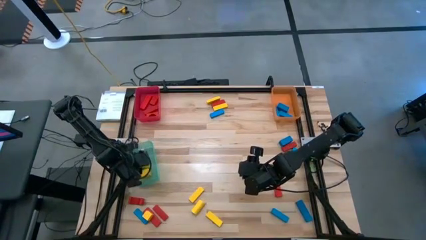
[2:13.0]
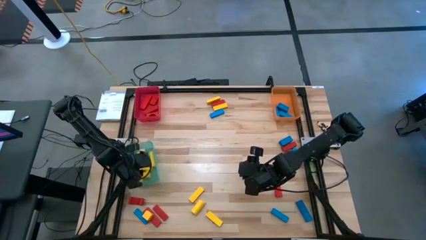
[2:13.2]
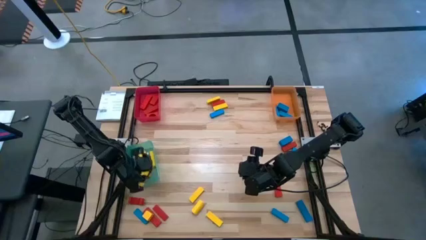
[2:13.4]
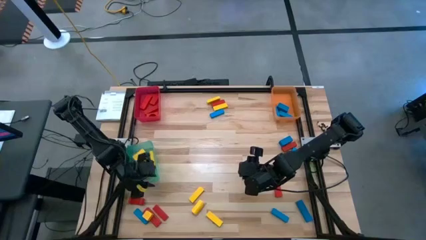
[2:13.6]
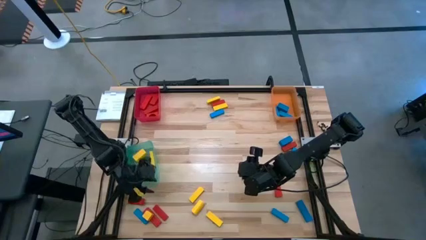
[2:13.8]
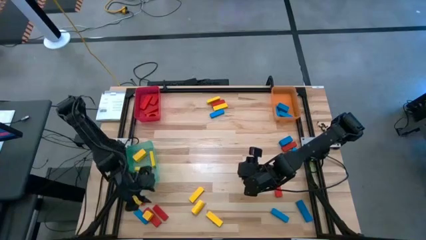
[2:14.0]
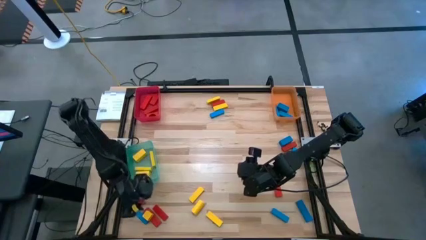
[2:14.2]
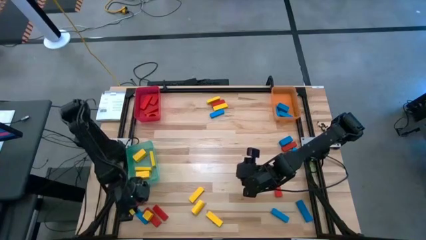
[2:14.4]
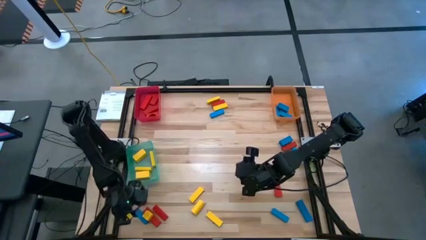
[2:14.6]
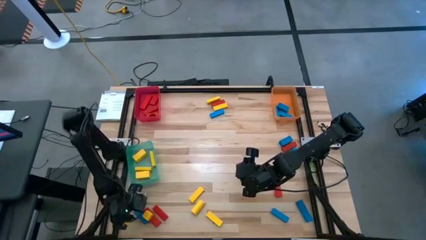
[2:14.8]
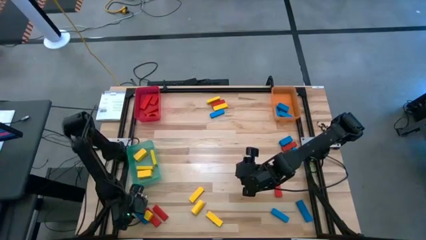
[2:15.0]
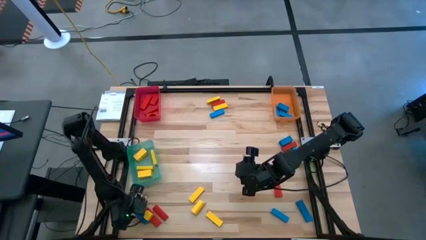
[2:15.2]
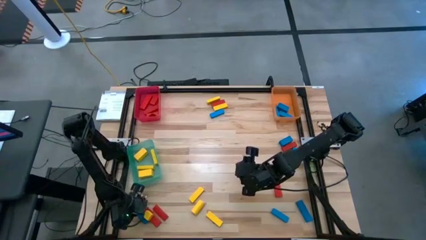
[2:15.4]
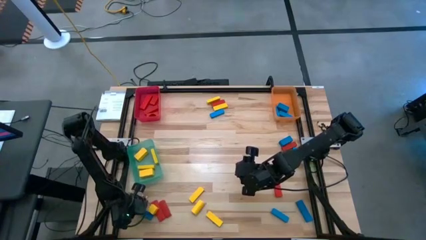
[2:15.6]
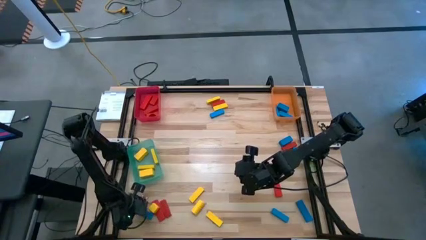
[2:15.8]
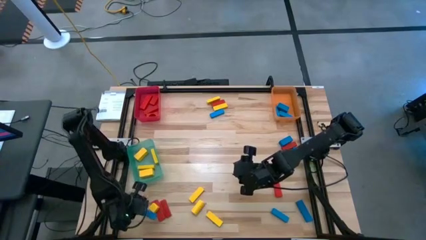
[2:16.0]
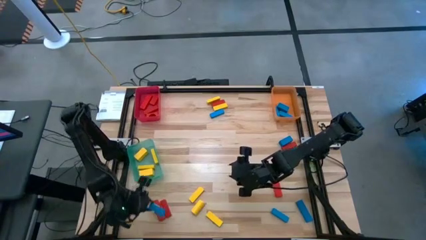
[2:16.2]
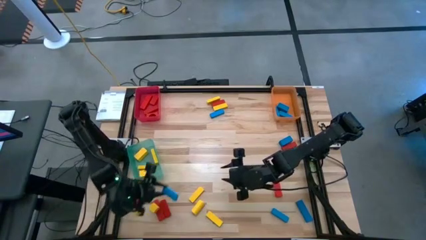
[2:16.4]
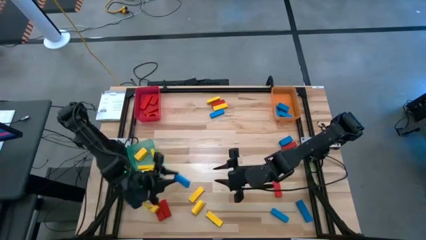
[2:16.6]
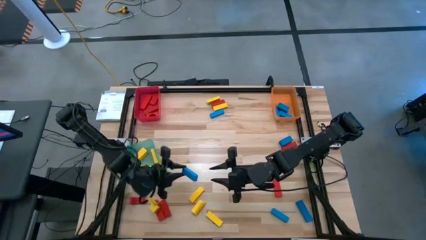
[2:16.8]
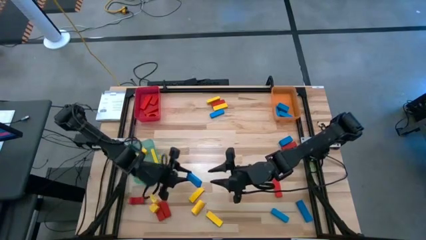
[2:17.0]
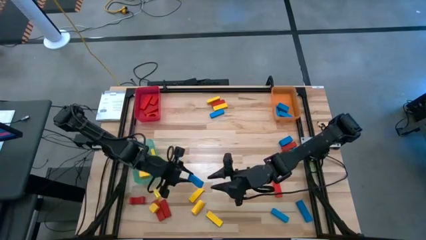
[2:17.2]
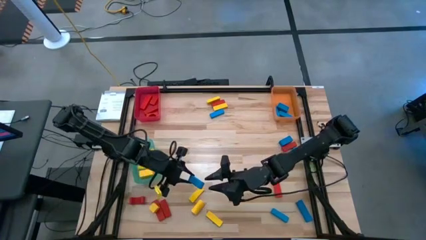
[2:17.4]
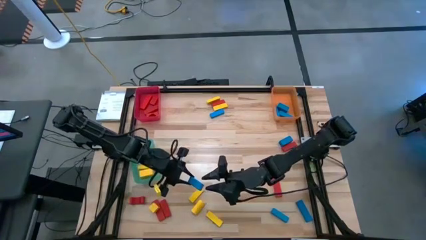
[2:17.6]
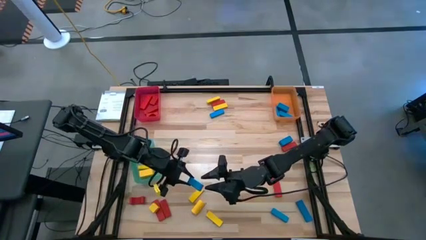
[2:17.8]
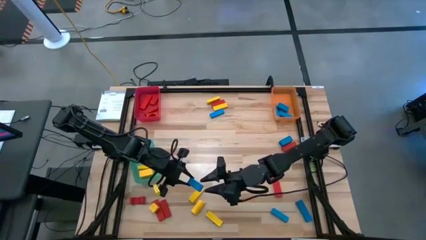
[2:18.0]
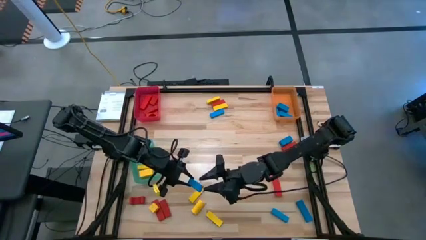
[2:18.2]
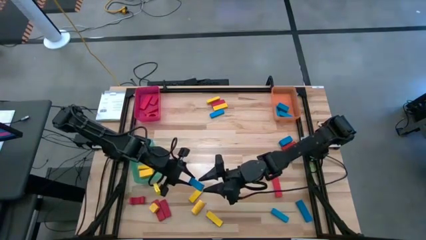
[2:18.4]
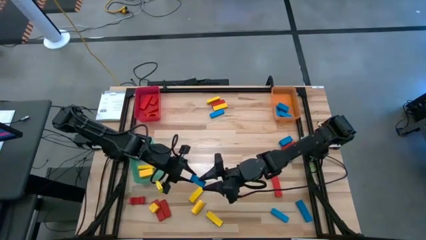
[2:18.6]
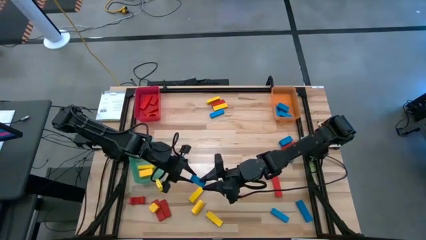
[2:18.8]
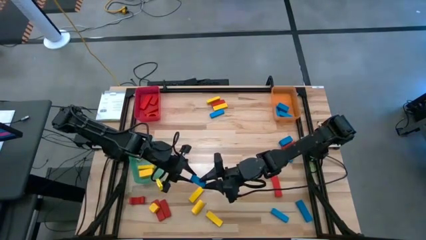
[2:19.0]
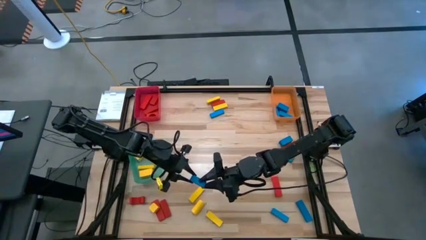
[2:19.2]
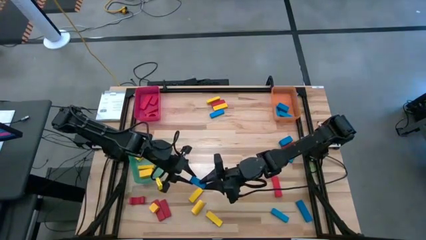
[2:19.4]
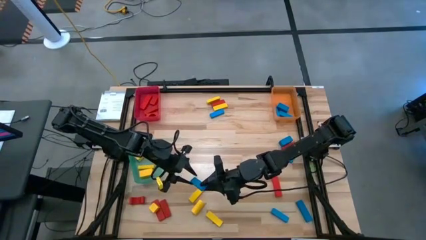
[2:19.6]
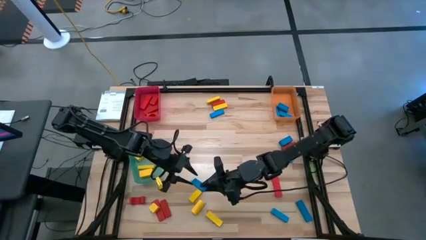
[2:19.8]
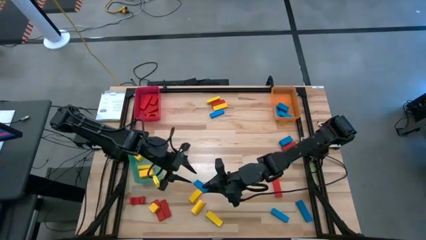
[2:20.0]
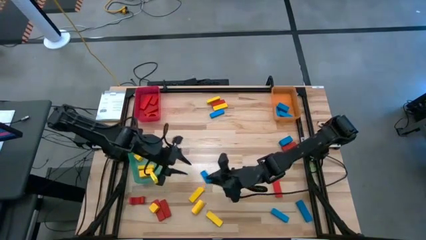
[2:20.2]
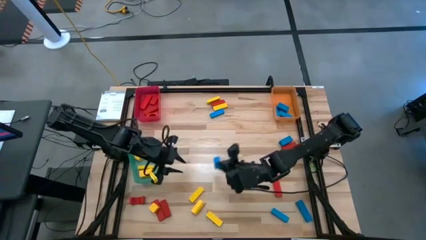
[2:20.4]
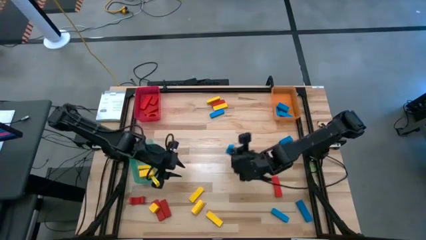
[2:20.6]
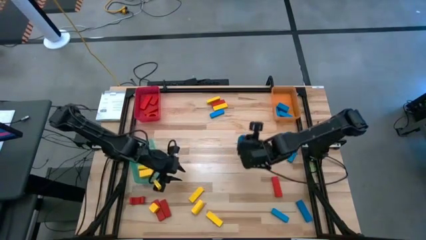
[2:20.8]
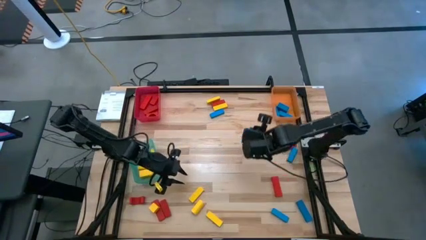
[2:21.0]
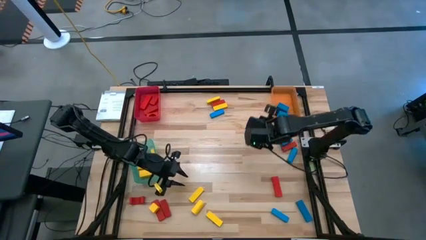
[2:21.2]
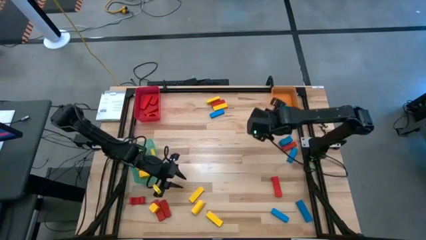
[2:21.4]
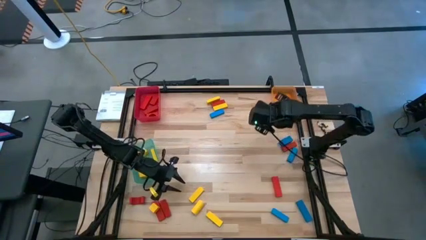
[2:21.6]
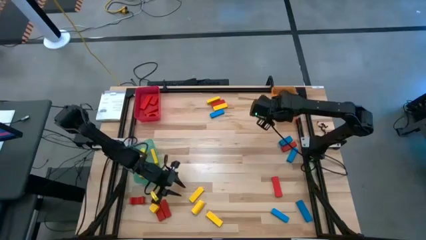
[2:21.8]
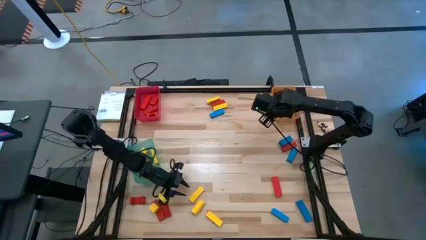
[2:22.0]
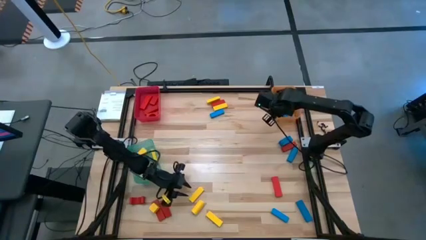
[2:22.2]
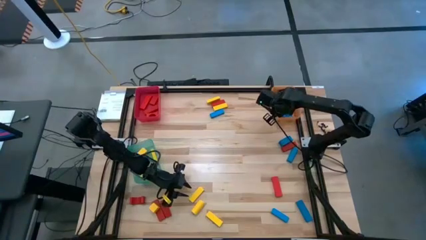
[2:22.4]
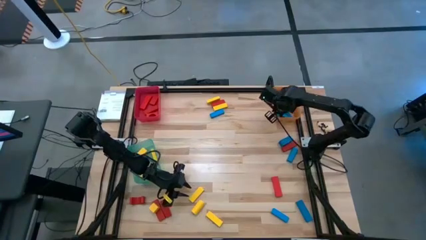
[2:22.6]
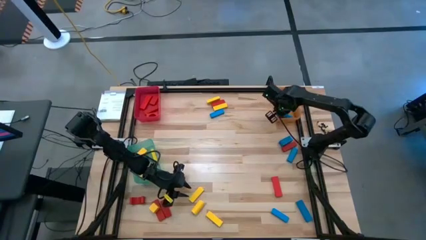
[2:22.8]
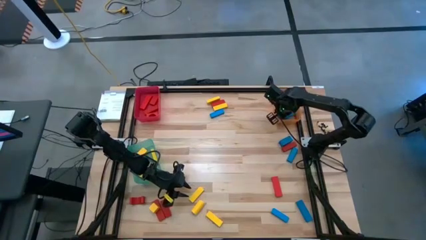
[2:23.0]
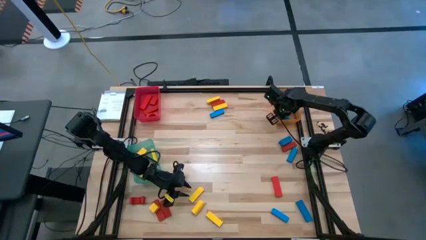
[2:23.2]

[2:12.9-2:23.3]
Task: Sort blocks
Put the blue block into the orange bin

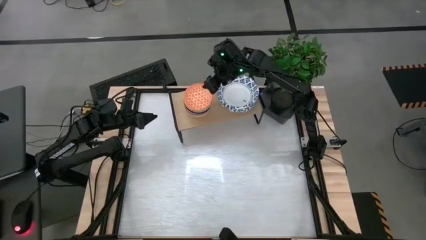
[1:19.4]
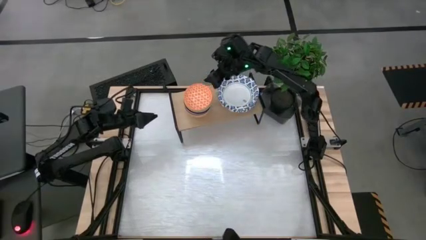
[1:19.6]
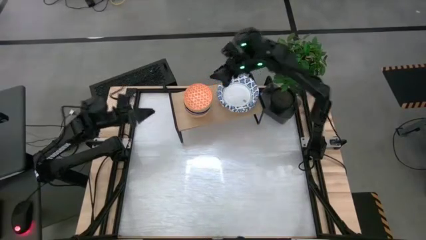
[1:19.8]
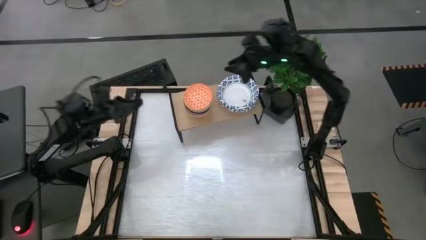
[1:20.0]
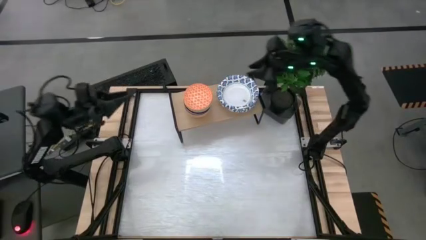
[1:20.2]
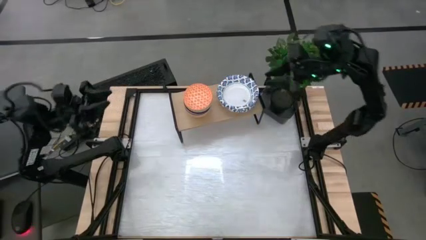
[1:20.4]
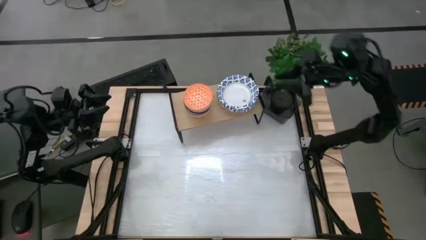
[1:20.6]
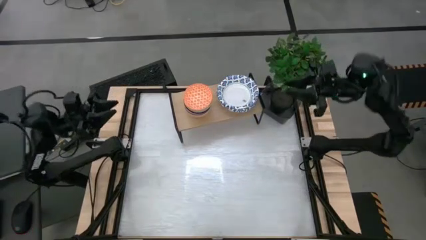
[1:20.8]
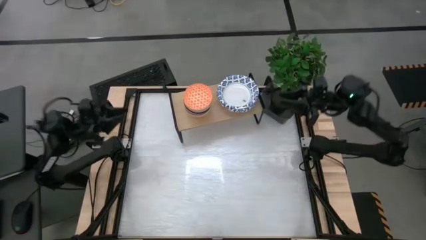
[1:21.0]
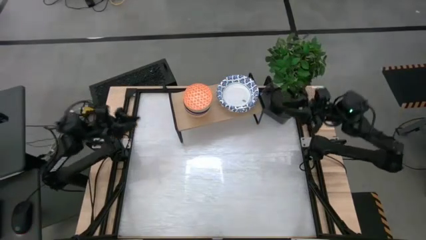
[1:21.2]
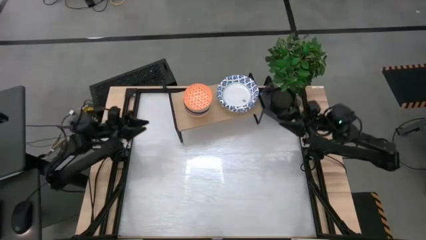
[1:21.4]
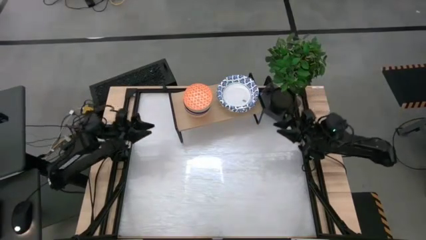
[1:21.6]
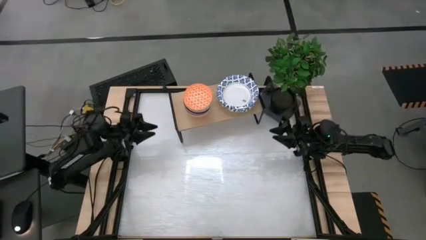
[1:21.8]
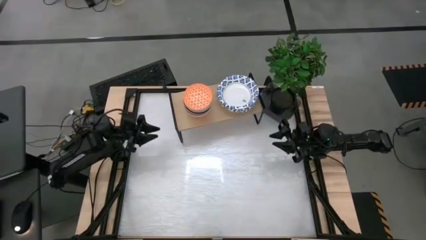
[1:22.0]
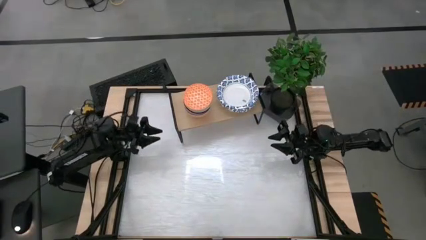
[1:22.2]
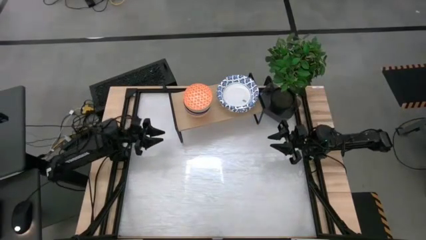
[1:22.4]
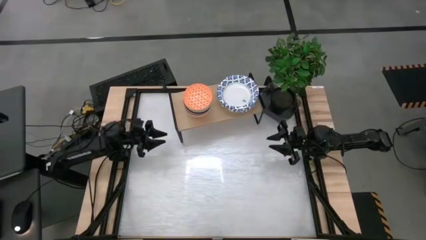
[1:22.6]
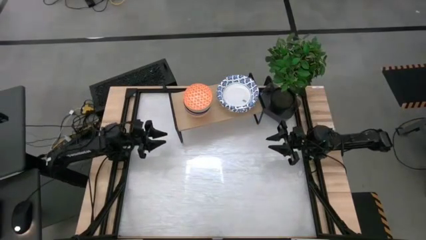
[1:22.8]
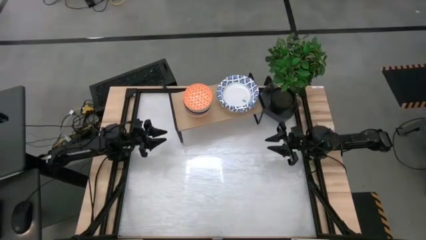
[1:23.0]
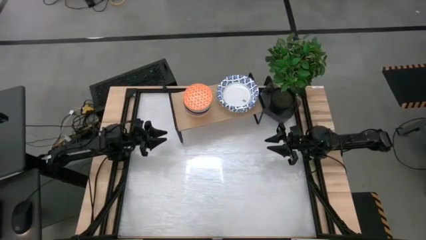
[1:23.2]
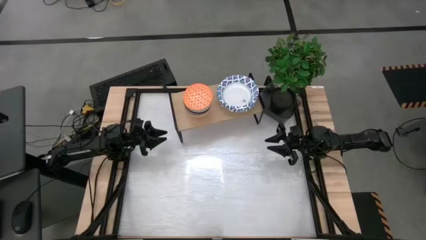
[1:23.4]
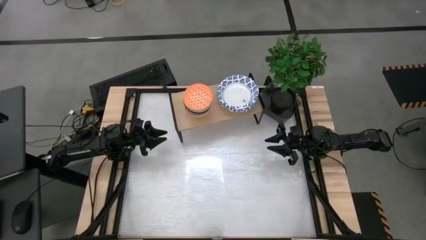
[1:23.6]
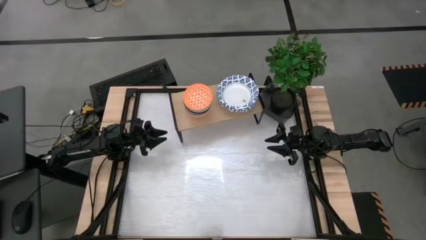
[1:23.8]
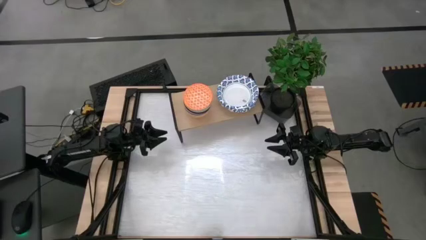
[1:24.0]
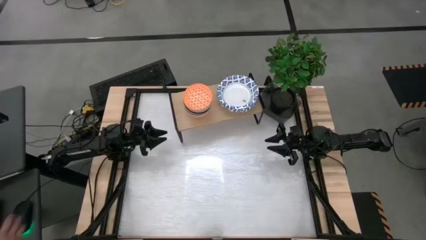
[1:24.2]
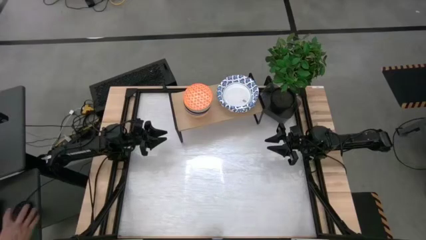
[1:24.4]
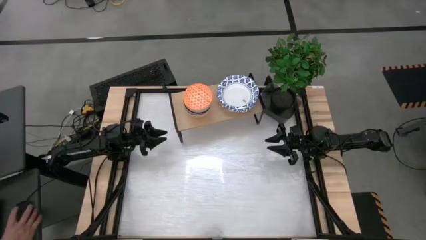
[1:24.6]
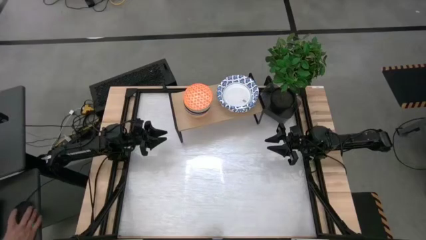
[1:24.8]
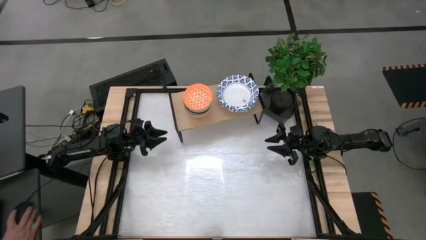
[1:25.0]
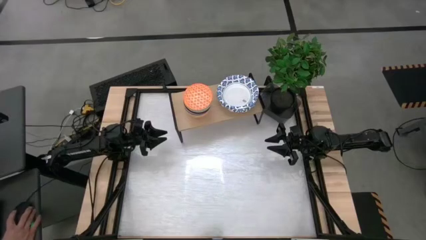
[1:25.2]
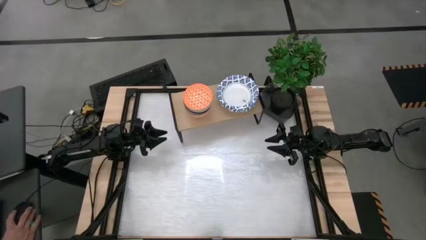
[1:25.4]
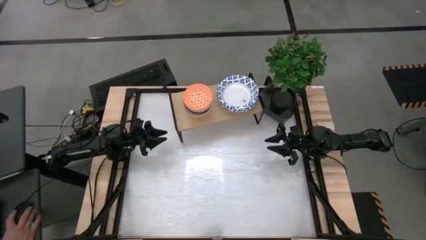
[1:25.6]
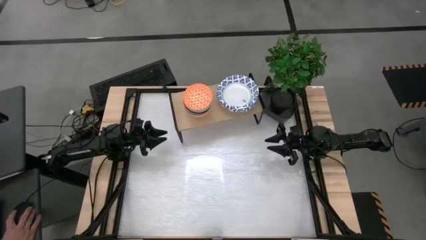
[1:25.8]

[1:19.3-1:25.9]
Task: Place and stack bowls onto a shelf
Return to Home Position
